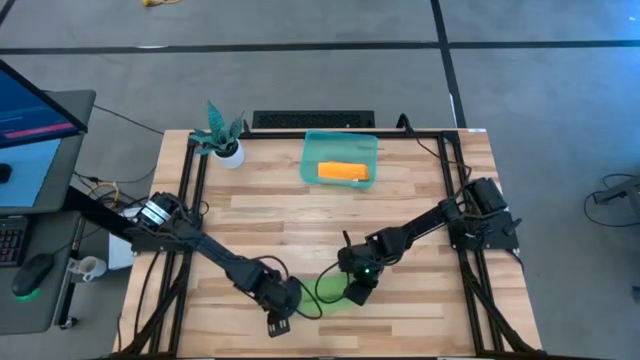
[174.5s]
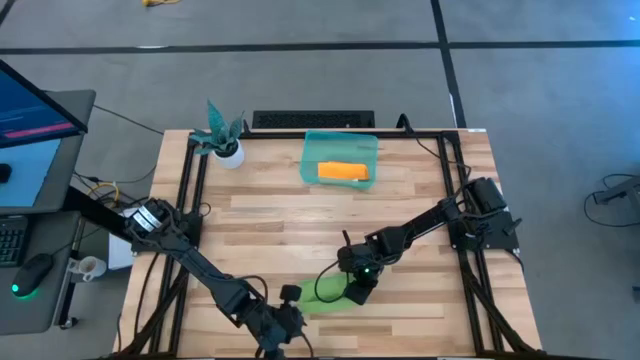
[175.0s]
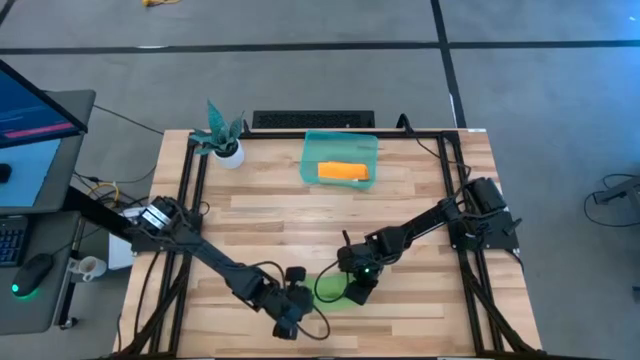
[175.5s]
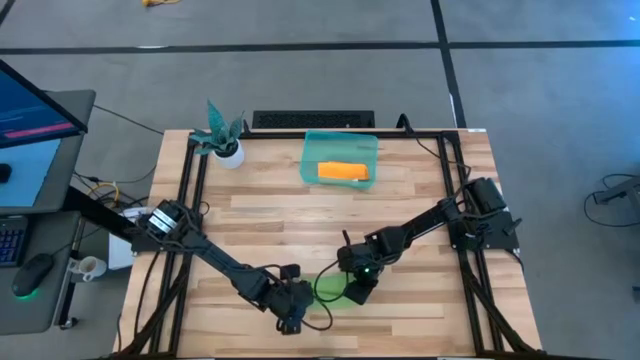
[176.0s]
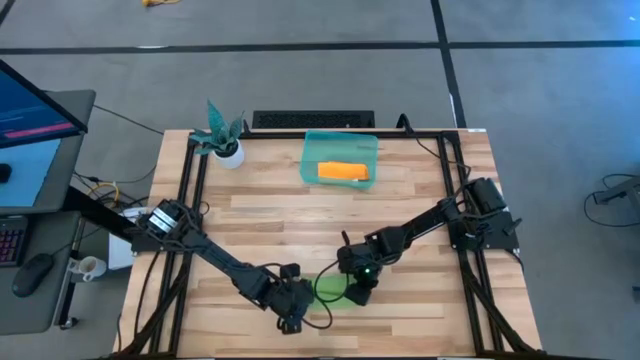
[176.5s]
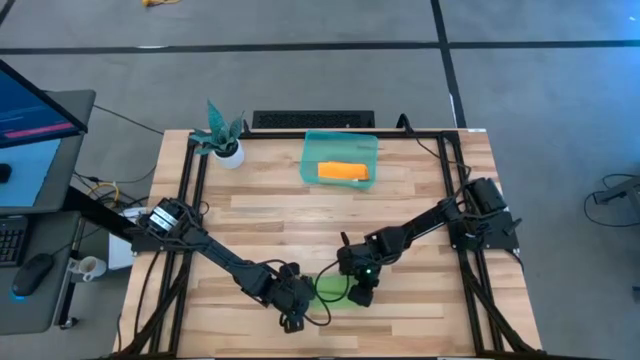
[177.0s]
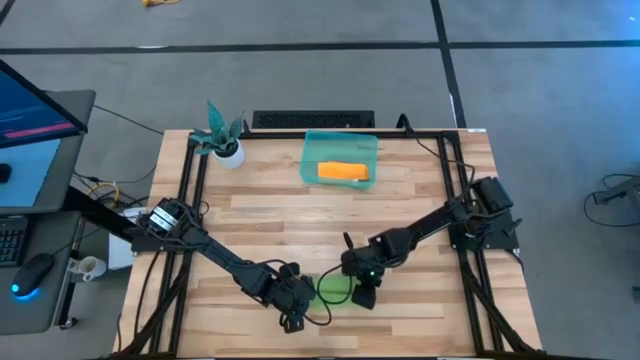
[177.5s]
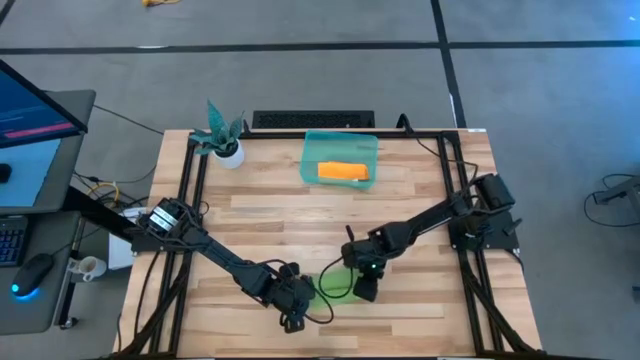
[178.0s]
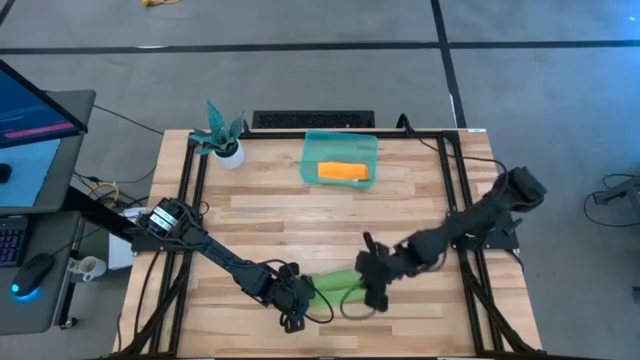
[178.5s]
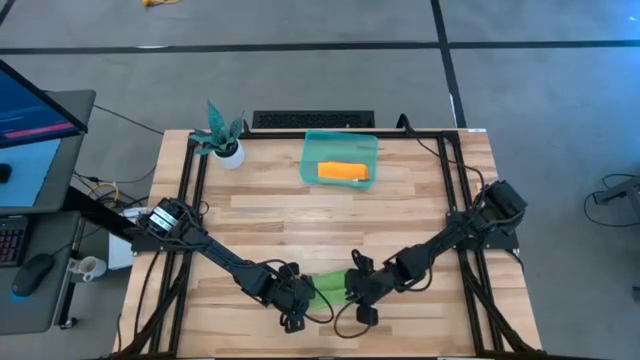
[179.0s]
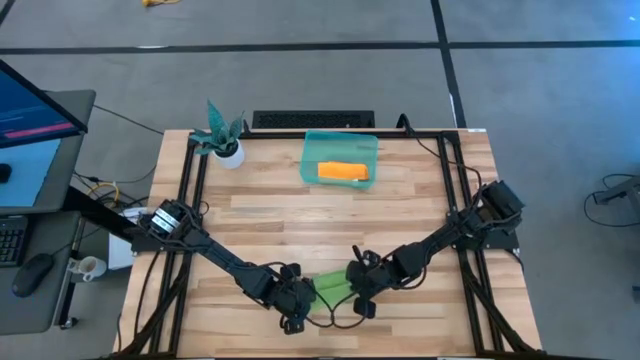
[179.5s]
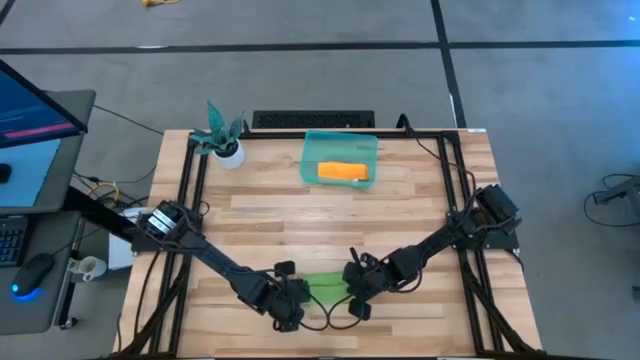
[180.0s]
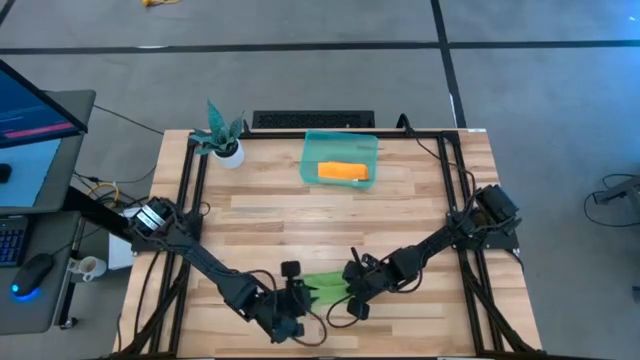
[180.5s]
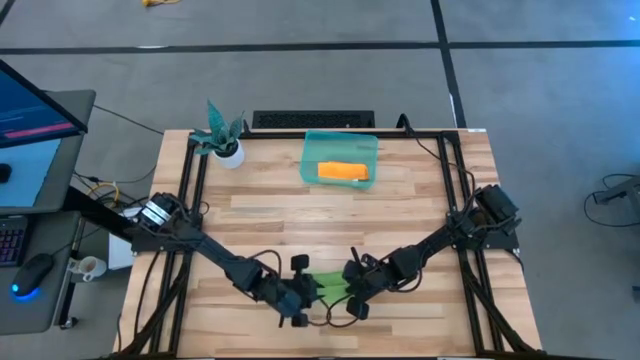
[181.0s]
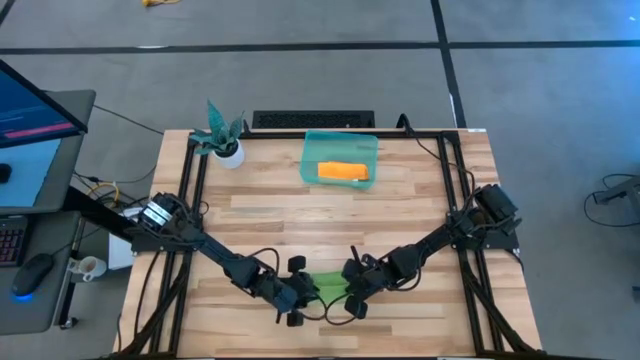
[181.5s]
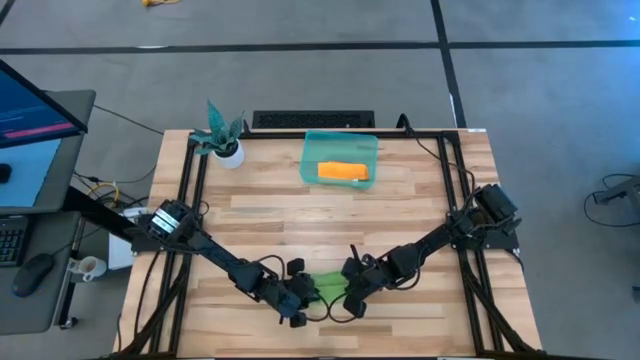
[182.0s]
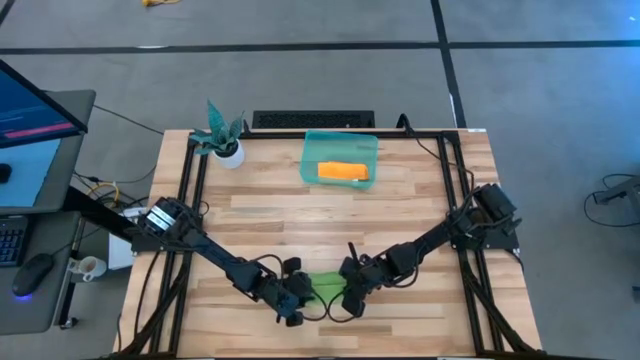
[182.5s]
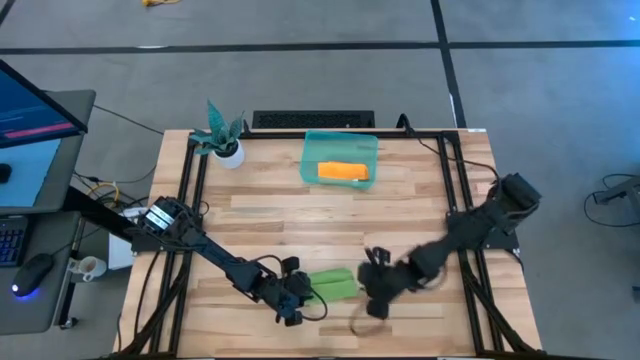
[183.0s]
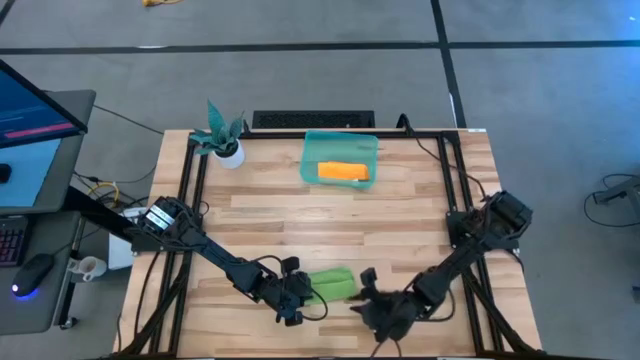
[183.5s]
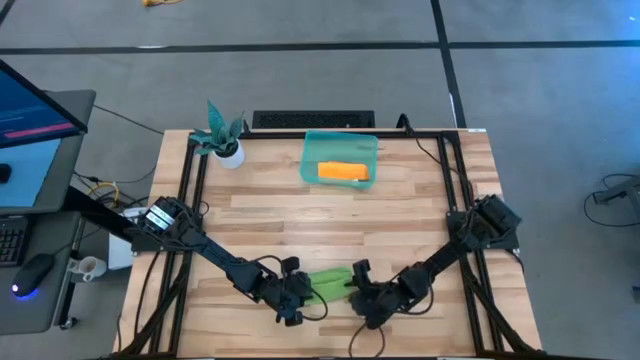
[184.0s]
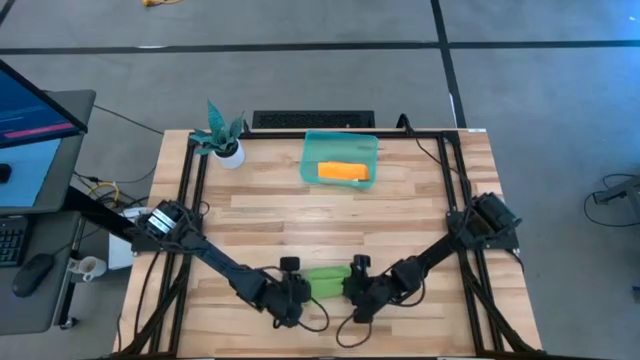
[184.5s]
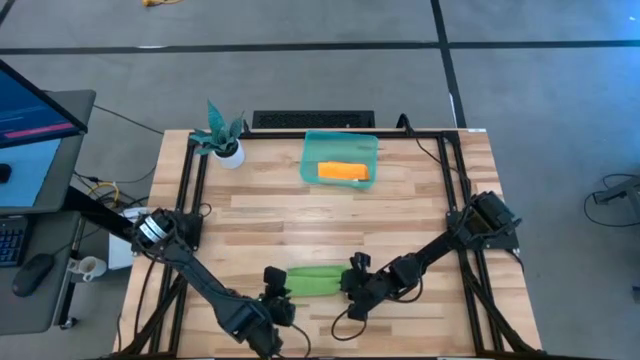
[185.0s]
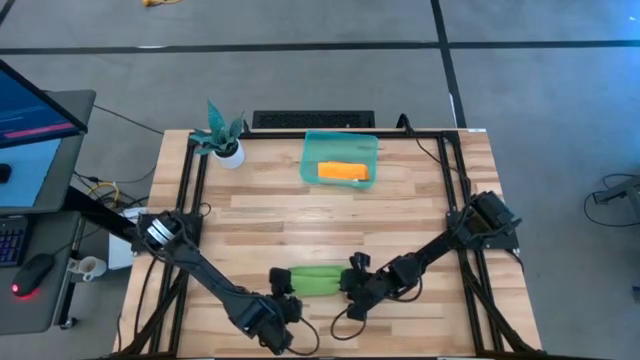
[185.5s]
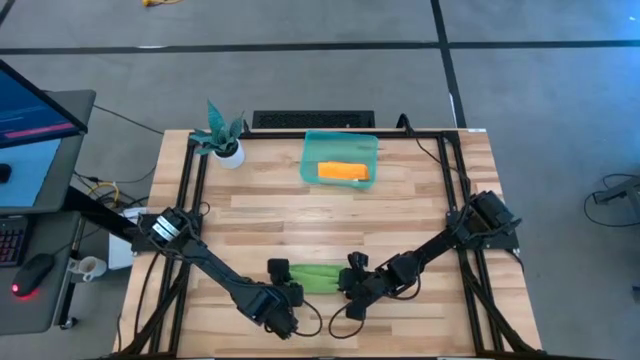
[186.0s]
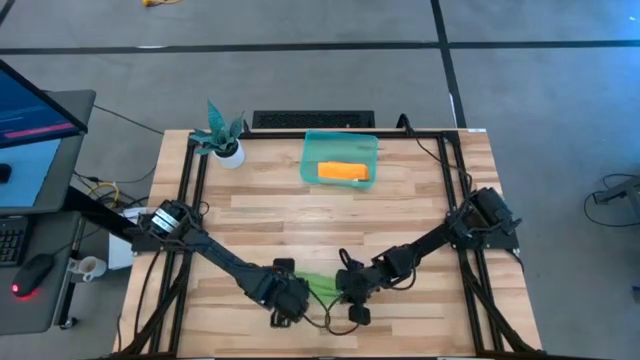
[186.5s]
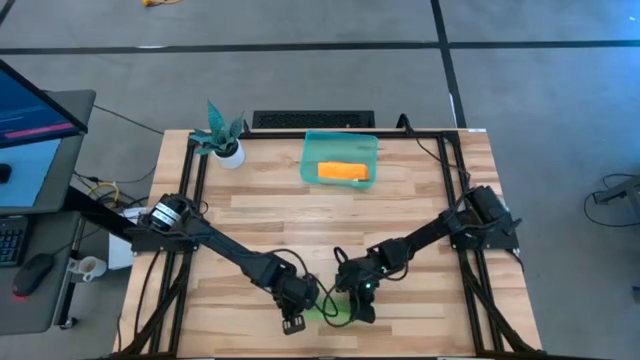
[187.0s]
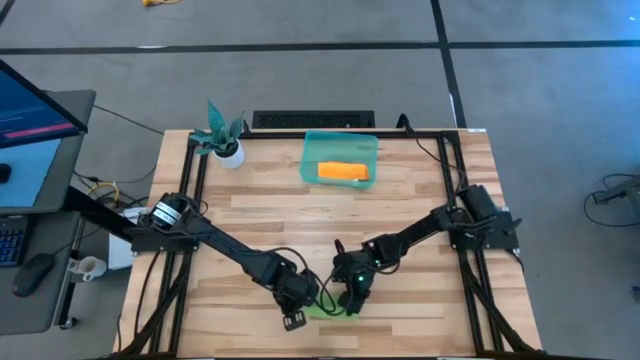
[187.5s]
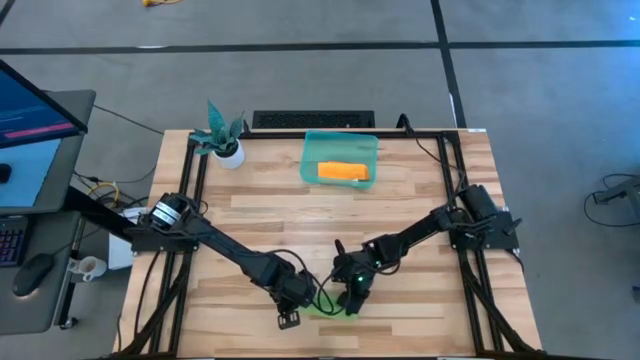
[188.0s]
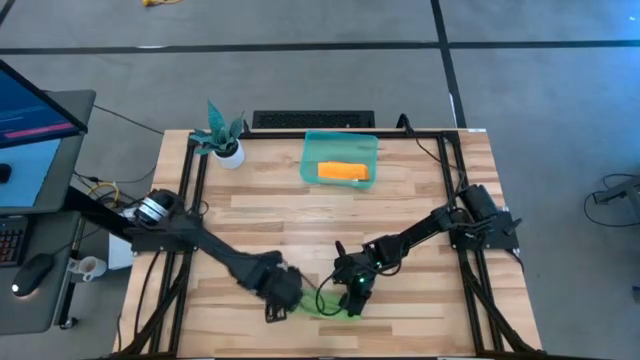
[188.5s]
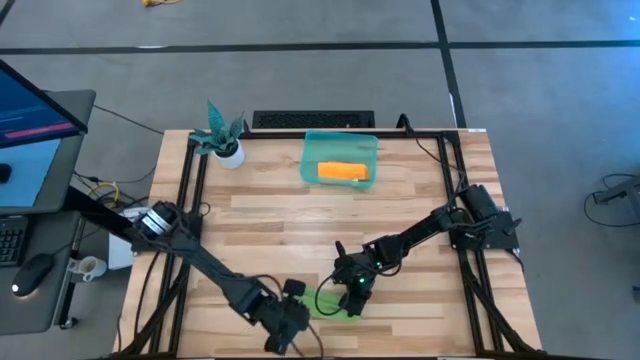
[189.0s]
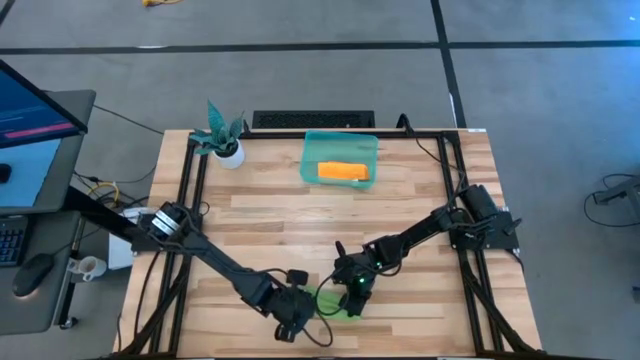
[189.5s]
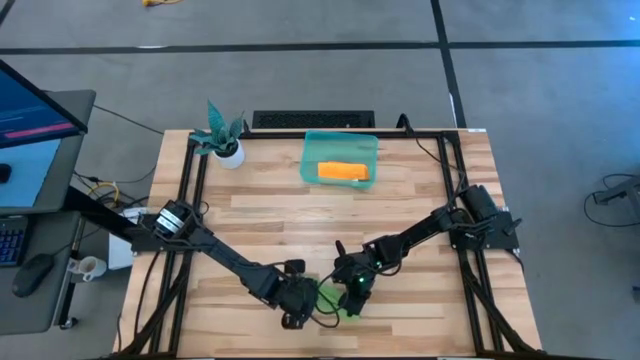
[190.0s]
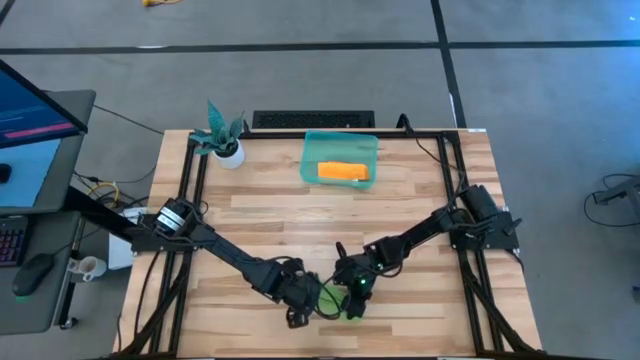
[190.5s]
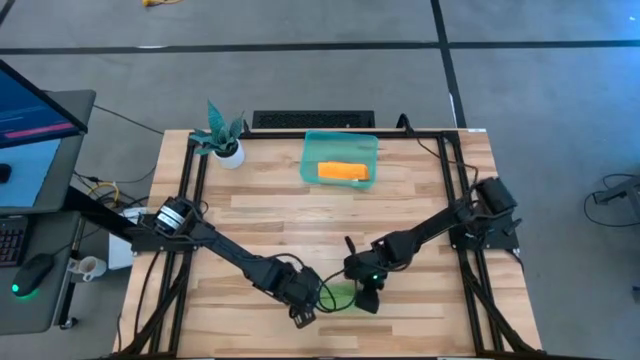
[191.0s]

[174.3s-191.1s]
Task: Roll microfiber towels into tight, uniform cylinder then place into a basket
Roll the green towel

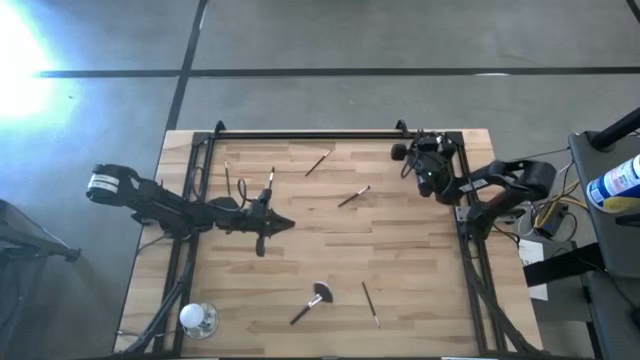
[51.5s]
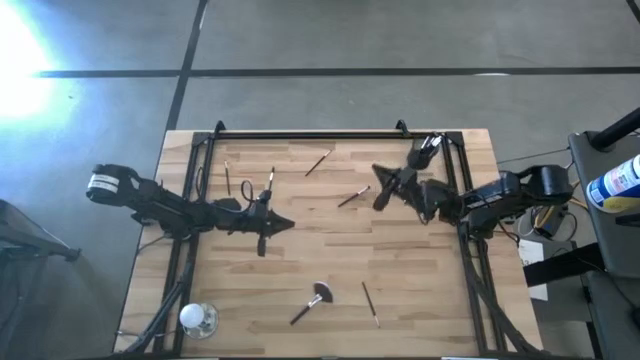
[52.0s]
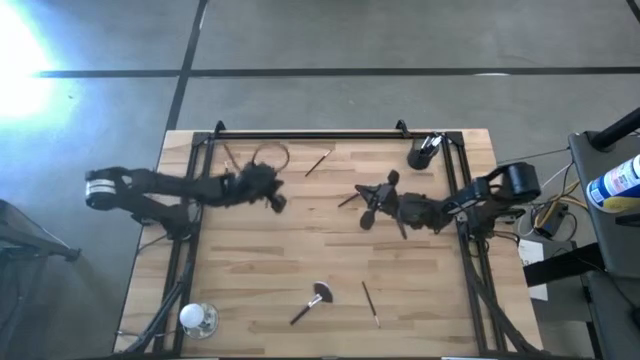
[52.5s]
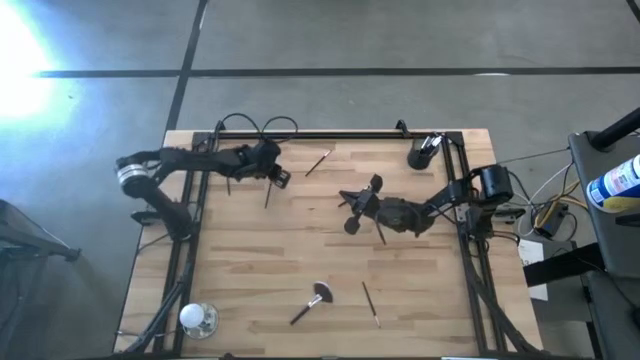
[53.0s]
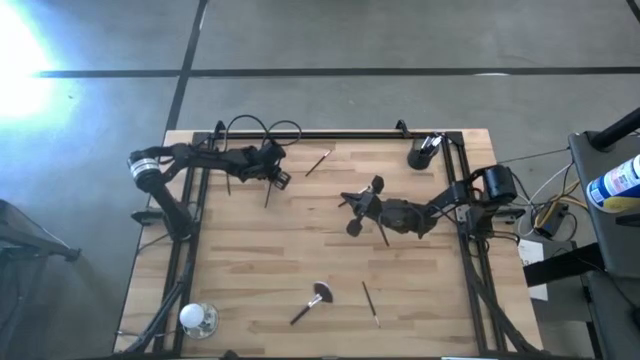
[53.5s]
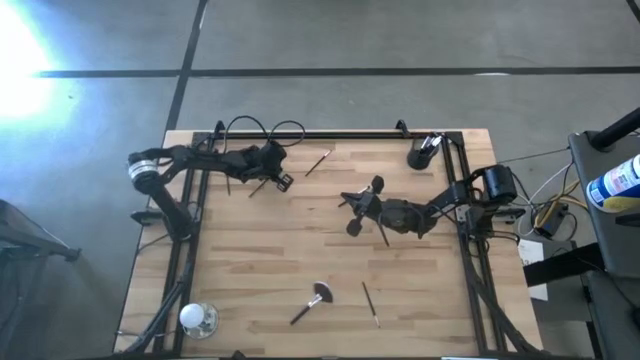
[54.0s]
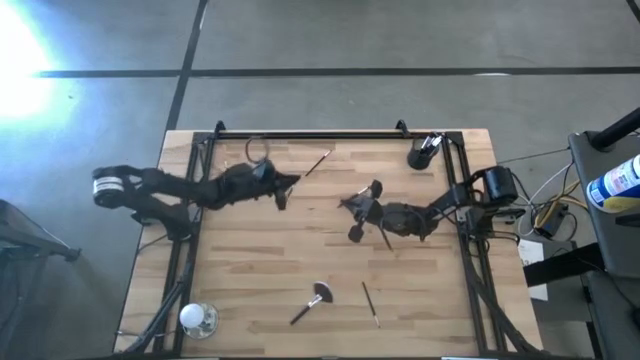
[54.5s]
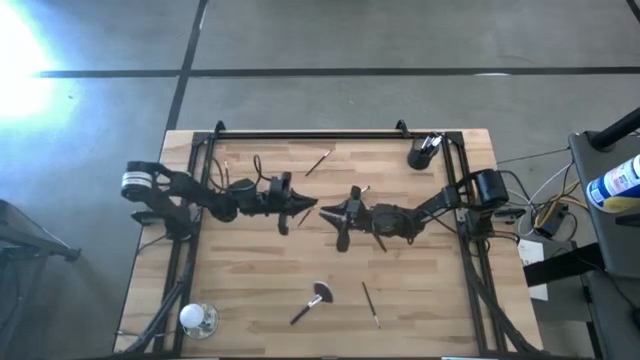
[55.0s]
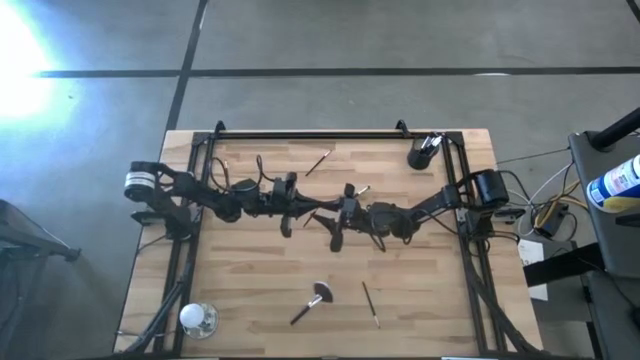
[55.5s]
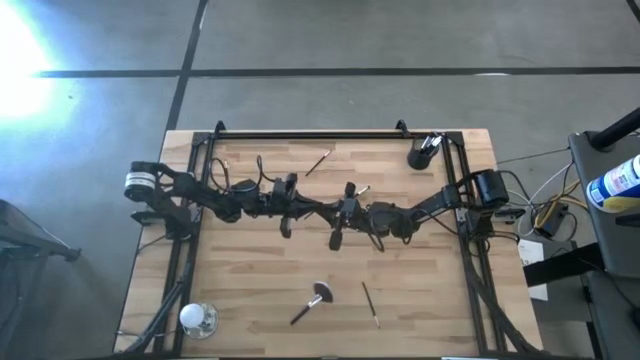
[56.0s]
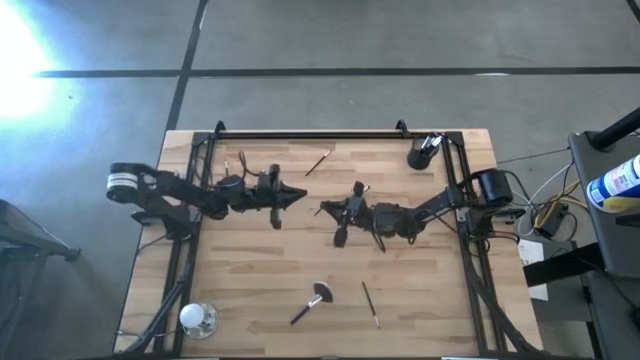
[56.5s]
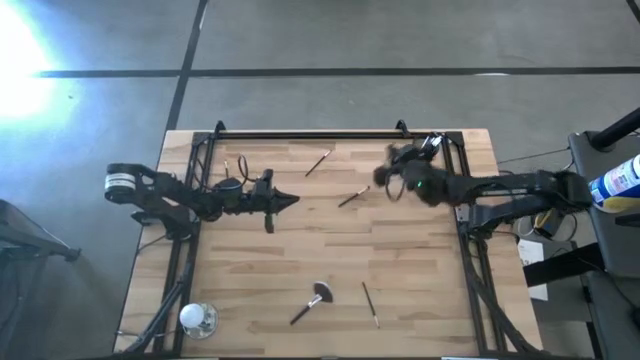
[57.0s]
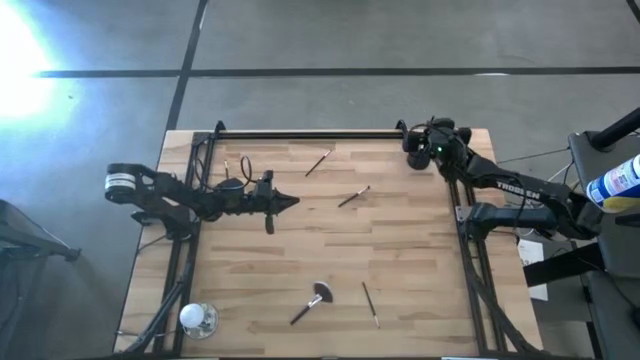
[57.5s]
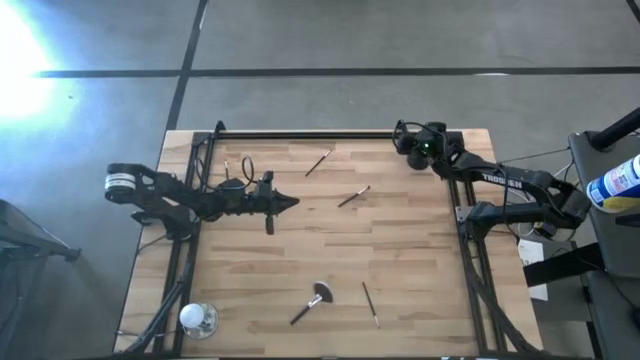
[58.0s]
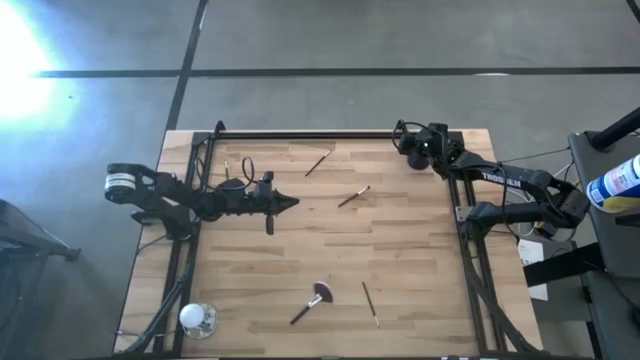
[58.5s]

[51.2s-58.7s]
Task: Put items in baskets/containers
Put the lash brush into the pen holder
